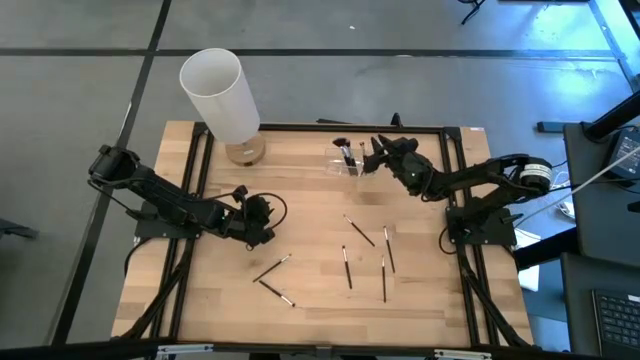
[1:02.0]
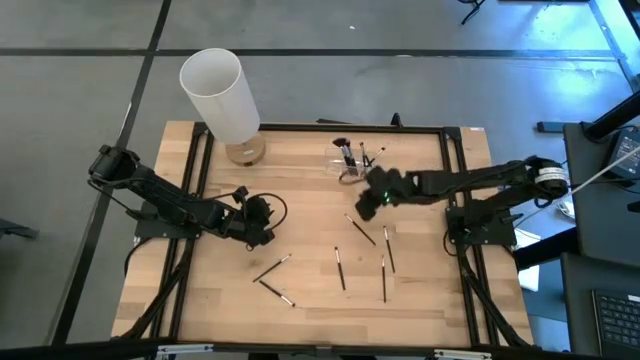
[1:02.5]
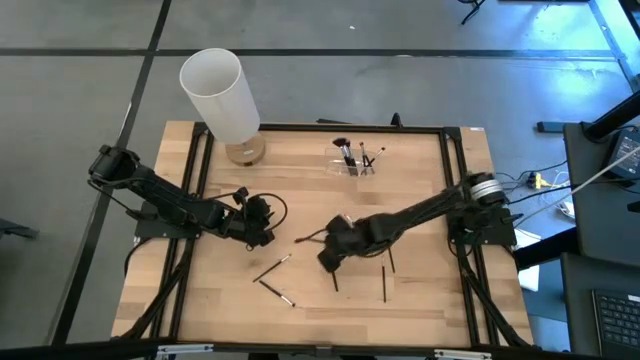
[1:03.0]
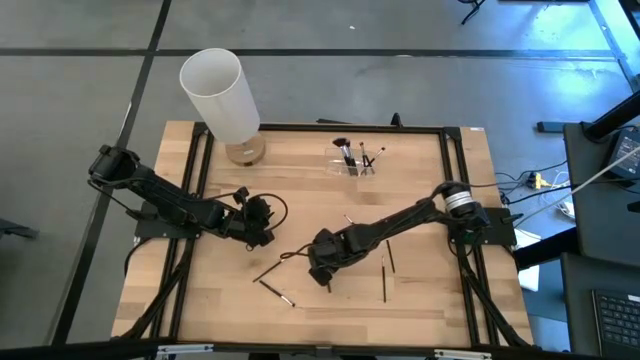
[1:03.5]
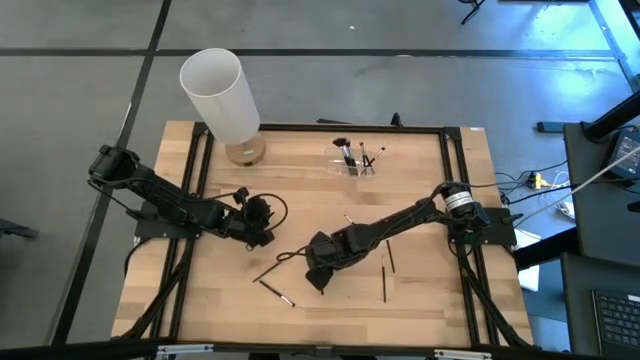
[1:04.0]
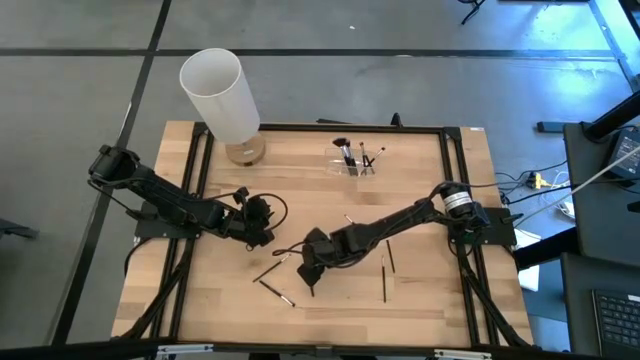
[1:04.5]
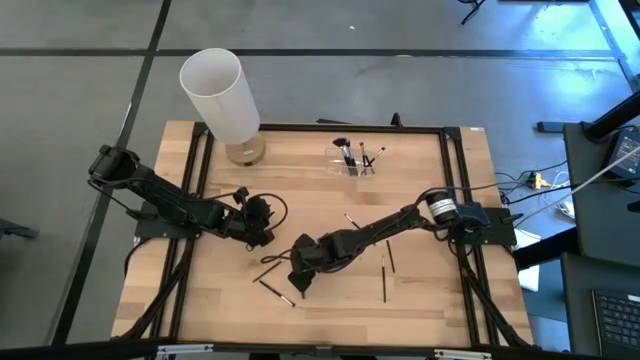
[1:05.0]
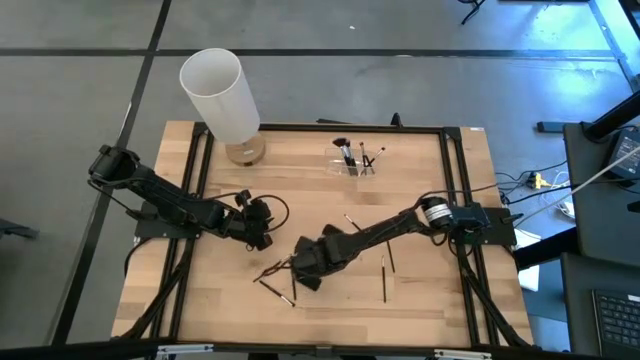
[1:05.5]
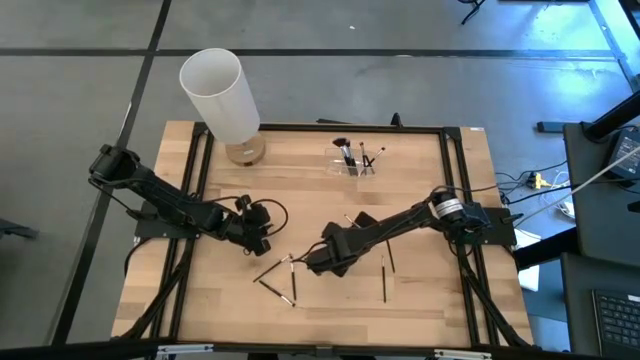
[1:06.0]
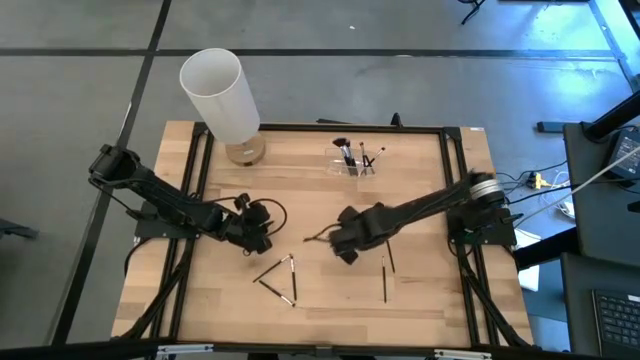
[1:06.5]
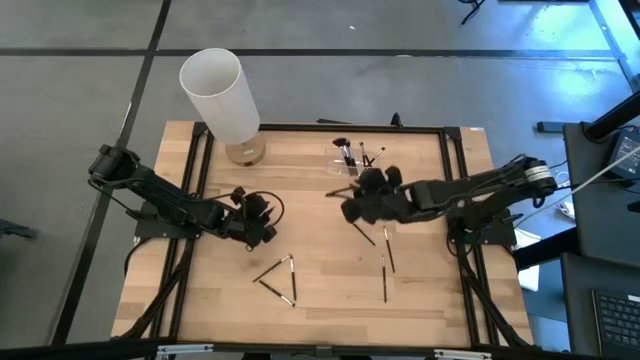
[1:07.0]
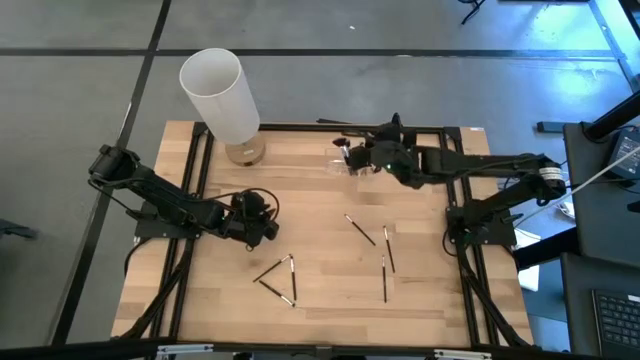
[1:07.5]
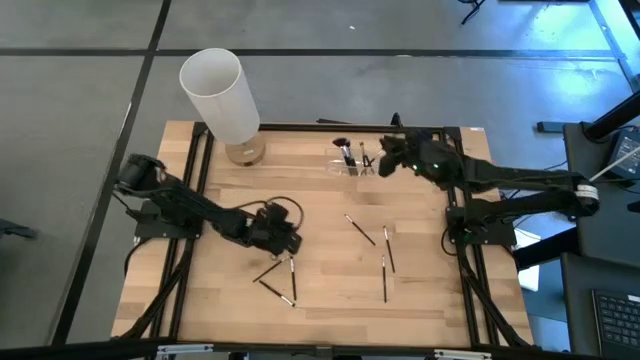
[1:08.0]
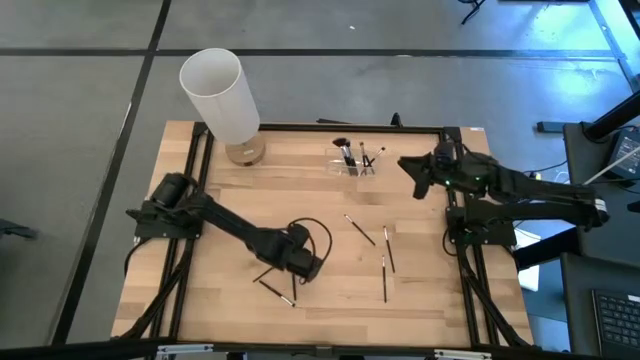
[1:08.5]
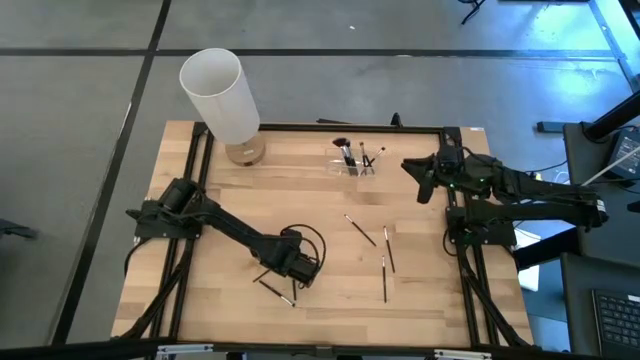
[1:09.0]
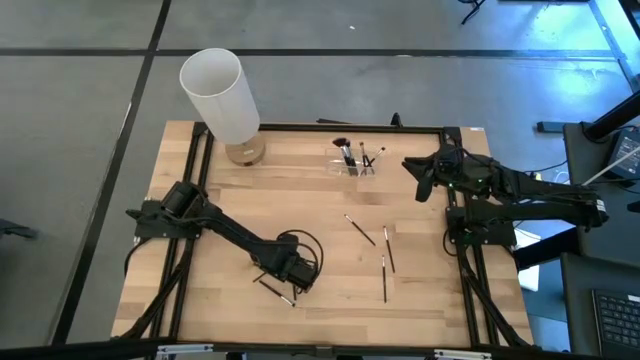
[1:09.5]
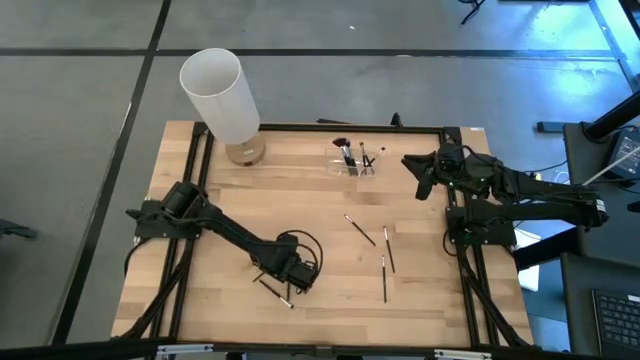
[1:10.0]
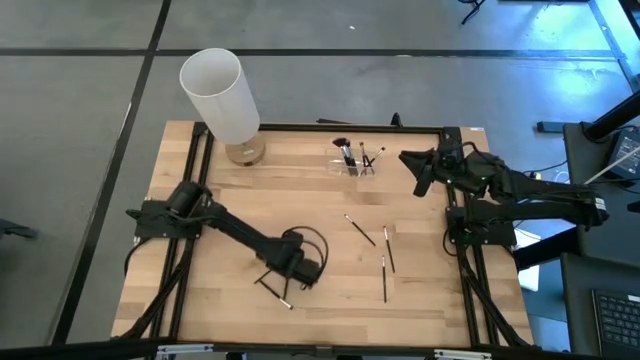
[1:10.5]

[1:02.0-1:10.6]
Task: Put items in baskets/containers
Put the black eyeshadow brush into the transparent organizer

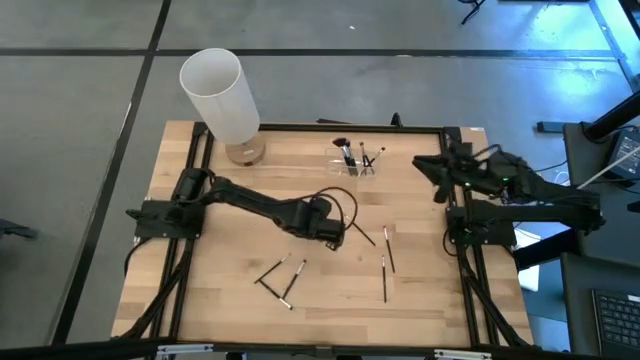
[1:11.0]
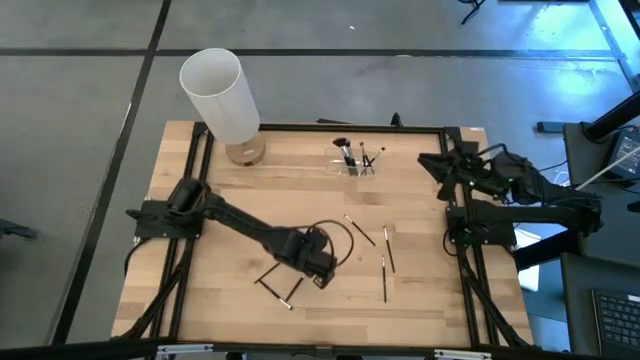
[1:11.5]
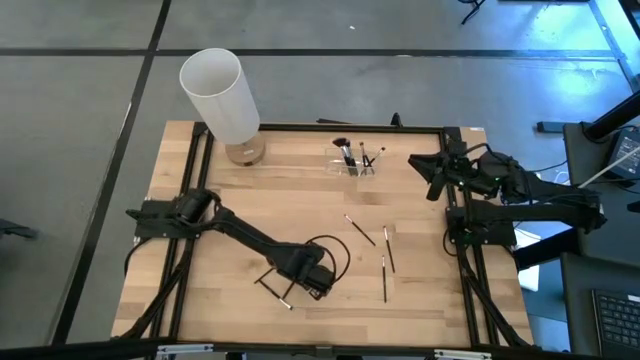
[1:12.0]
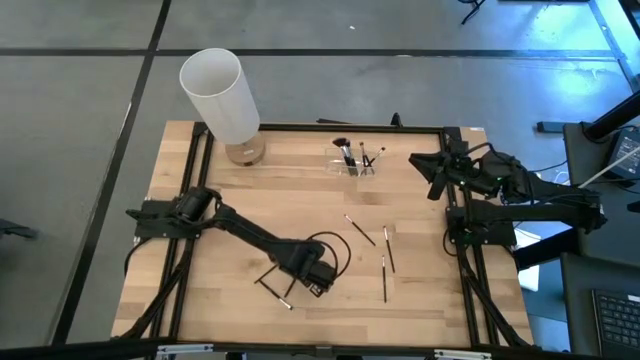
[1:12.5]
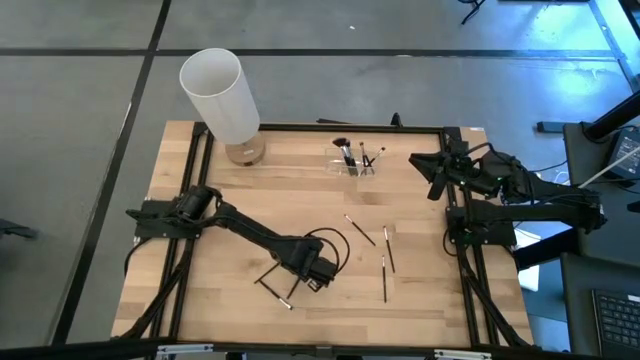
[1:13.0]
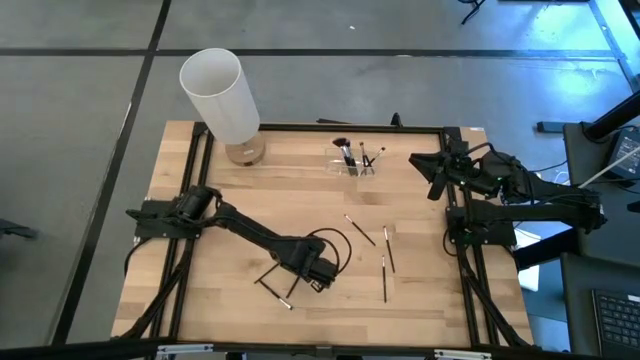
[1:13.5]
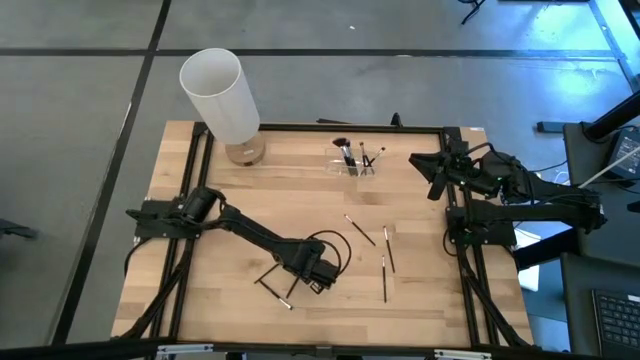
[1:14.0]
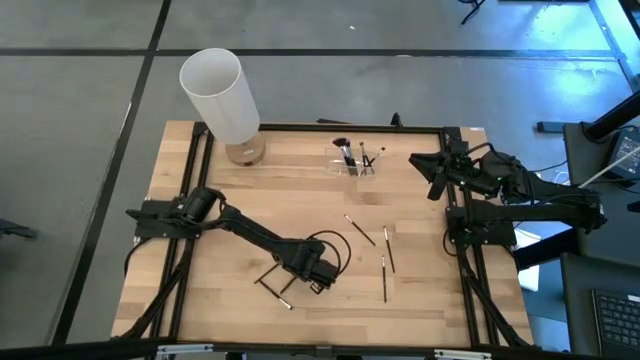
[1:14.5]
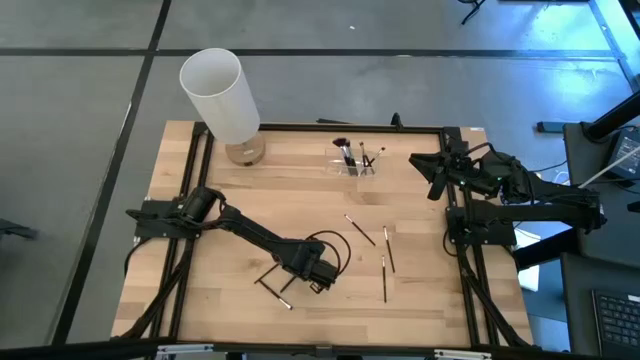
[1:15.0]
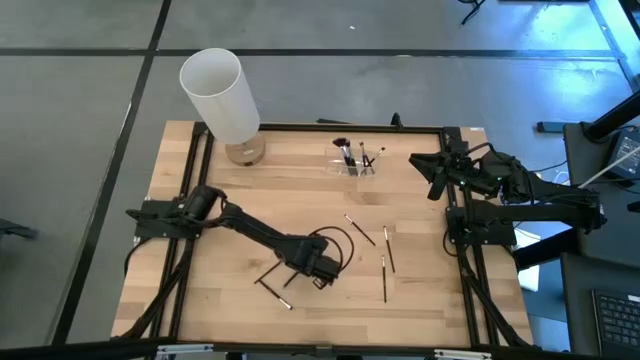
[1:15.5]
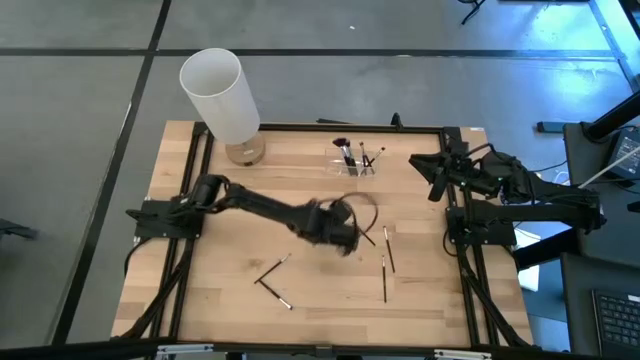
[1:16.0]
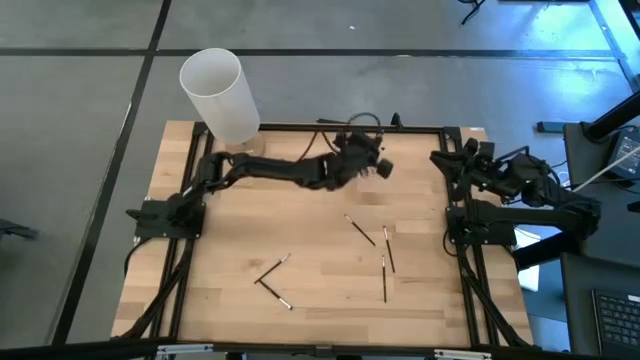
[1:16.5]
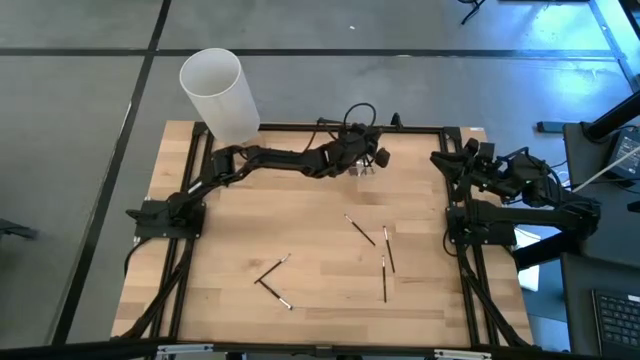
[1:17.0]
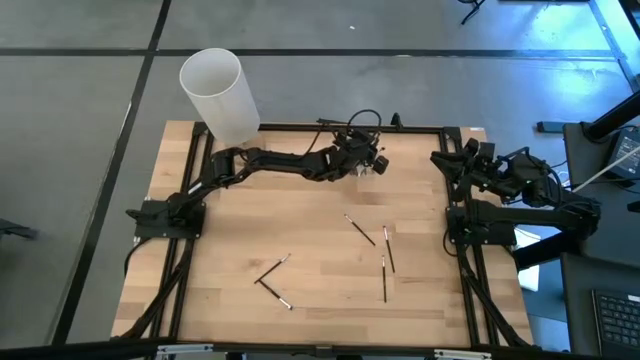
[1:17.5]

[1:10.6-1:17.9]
Put the black eyeshadow brush into the transparent organizer

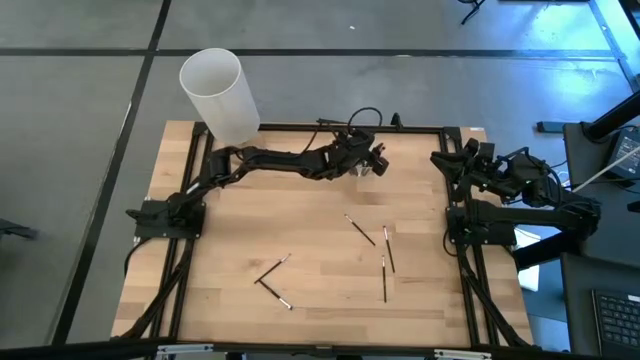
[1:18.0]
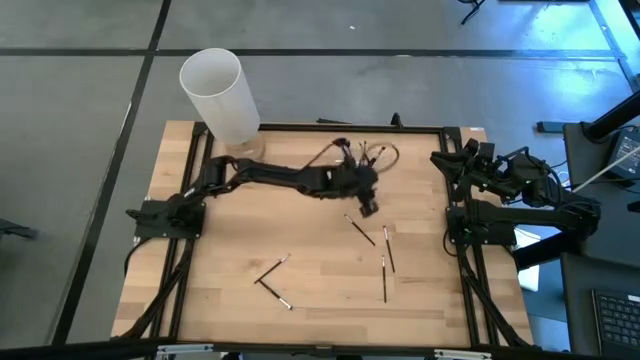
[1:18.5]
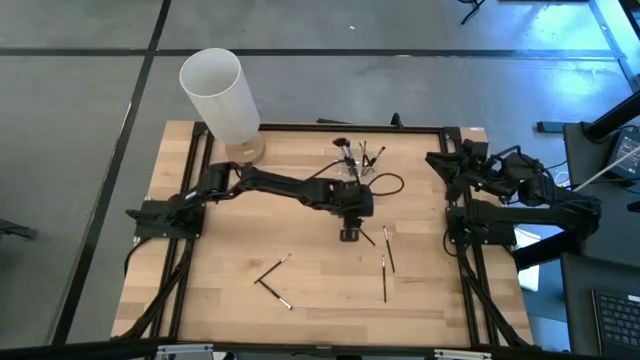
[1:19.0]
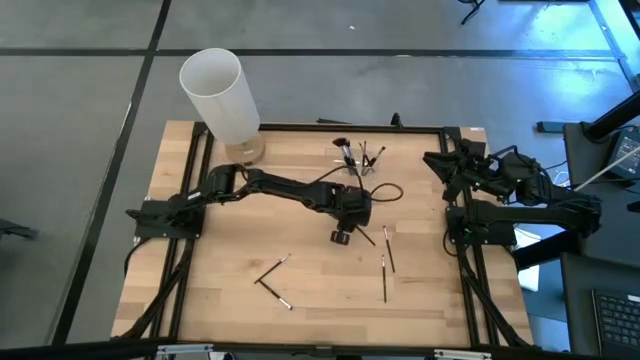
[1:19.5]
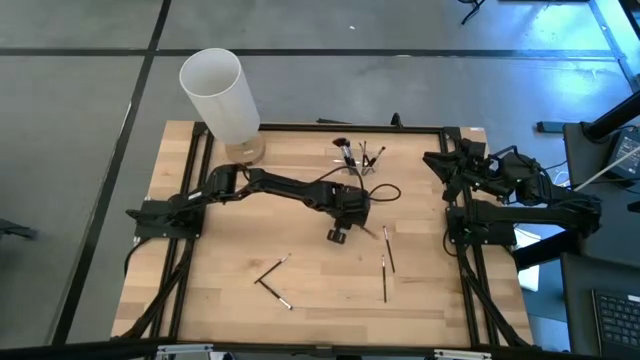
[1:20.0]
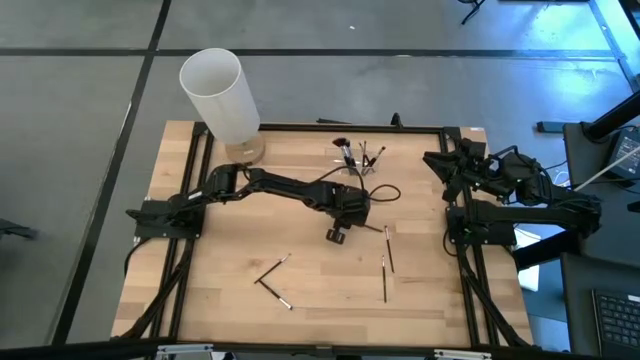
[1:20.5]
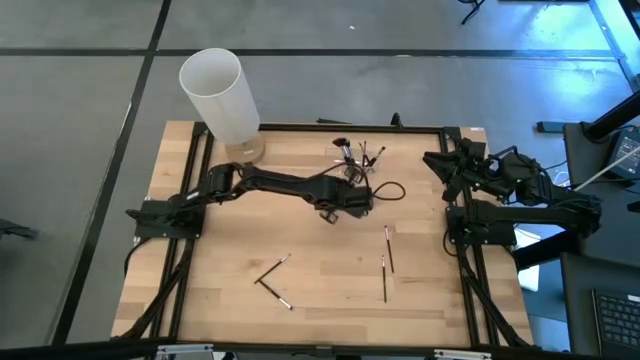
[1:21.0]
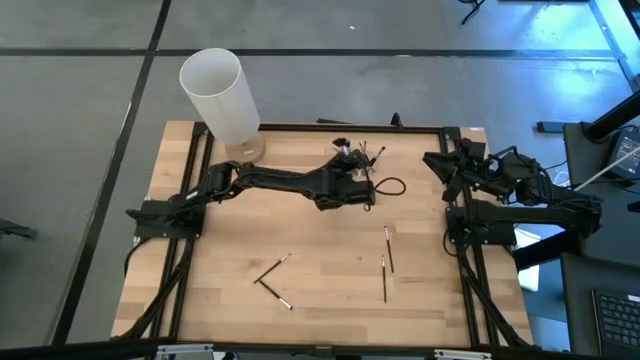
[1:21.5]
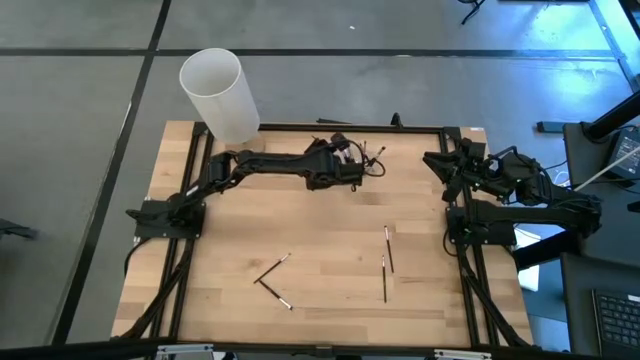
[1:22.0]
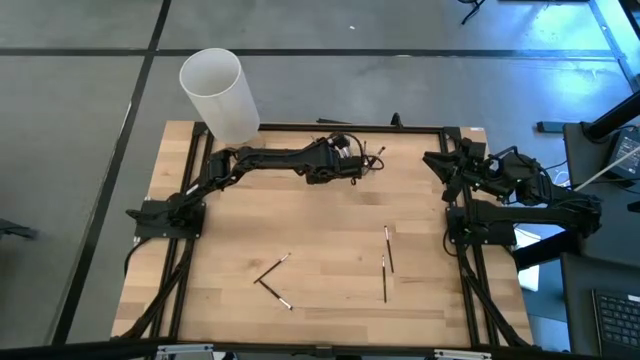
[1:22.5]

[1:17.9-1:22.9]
Put the black eyeshadow brush into the transparent organizer

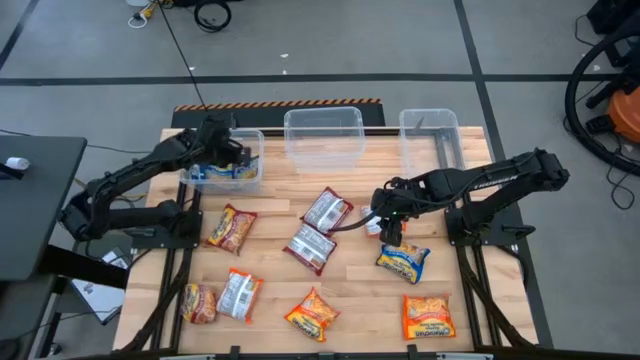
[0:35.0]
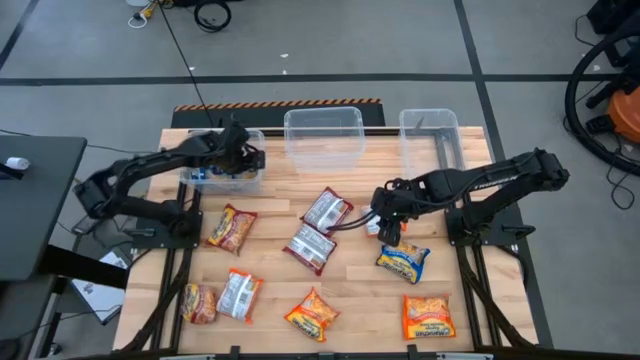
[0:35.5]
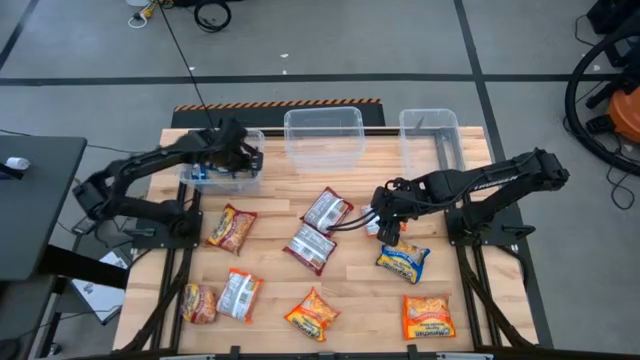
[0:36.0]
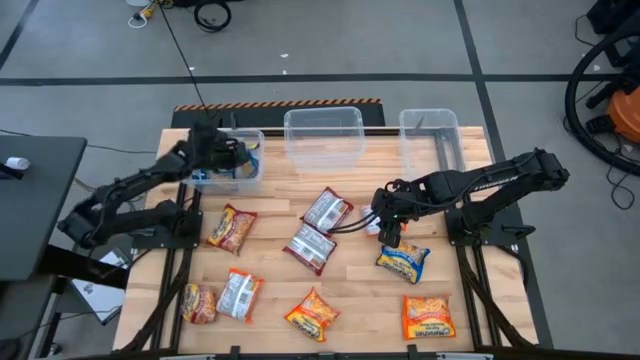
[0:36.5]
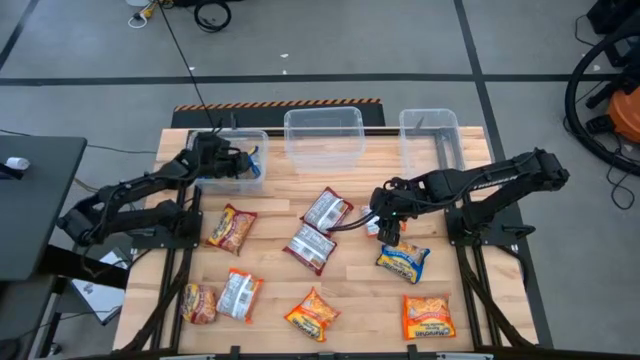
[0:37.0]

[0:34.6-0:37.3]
Task: Sort Maruchan noodles
Adjust the right blue noodle bag in the transparent bin
